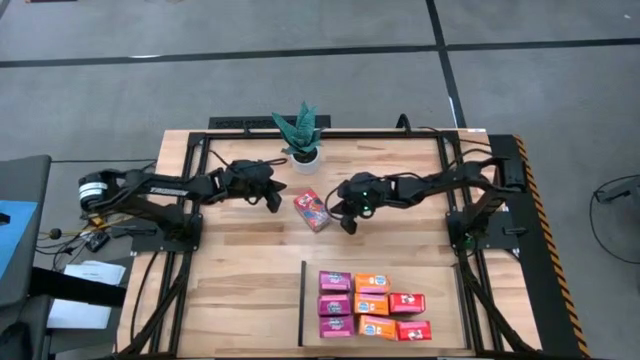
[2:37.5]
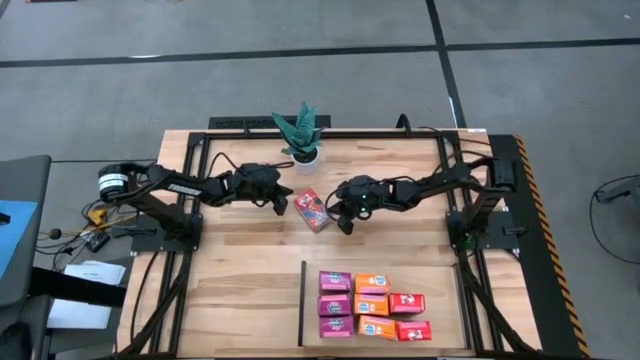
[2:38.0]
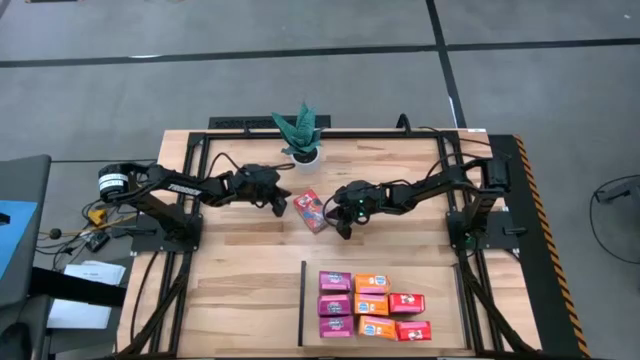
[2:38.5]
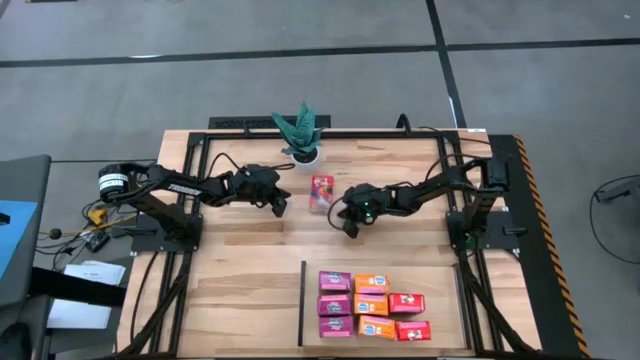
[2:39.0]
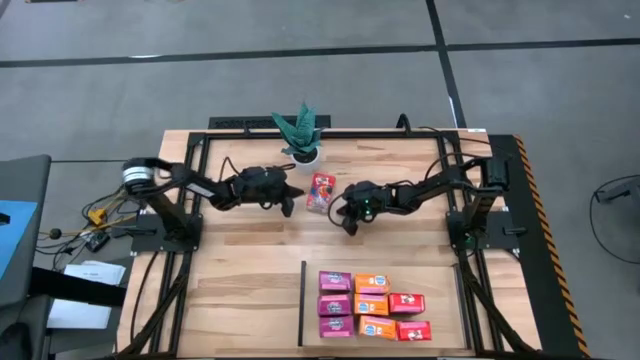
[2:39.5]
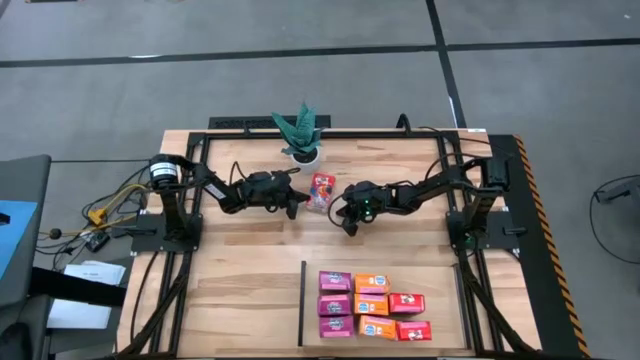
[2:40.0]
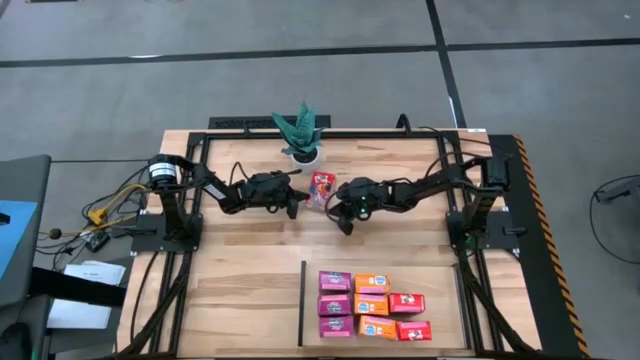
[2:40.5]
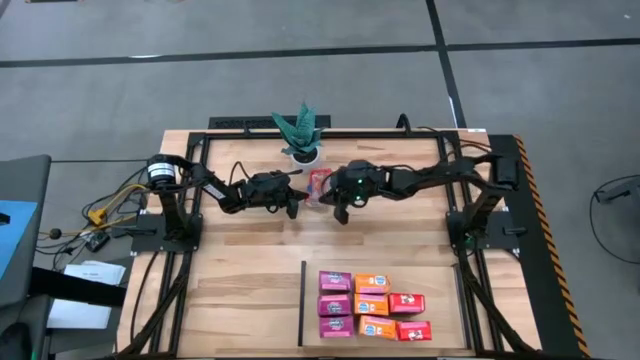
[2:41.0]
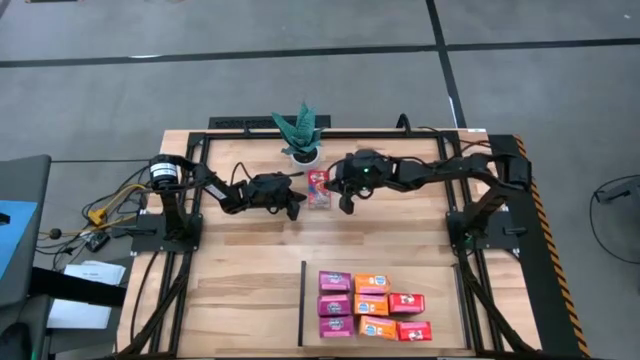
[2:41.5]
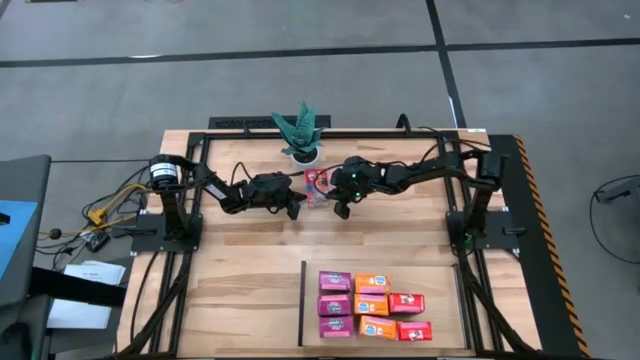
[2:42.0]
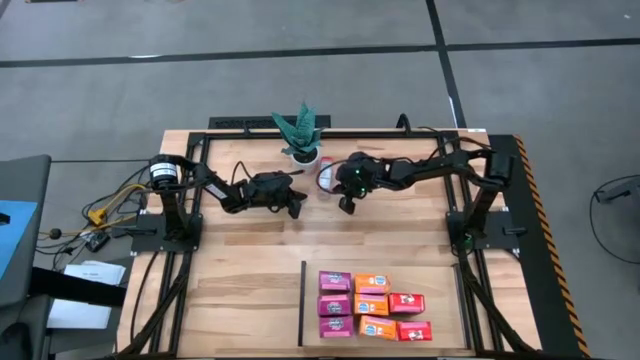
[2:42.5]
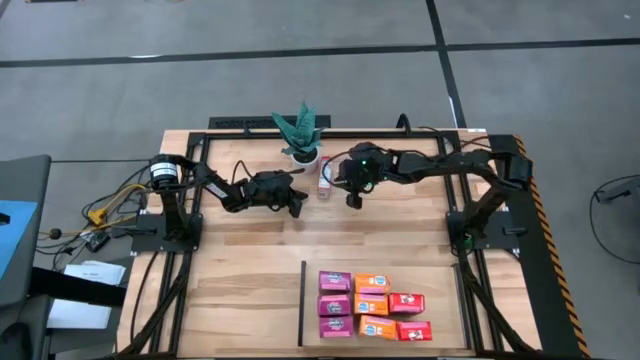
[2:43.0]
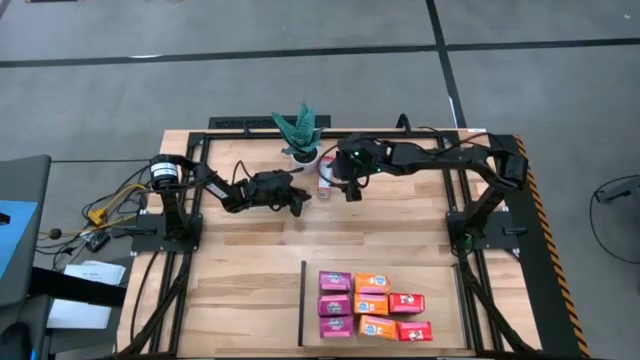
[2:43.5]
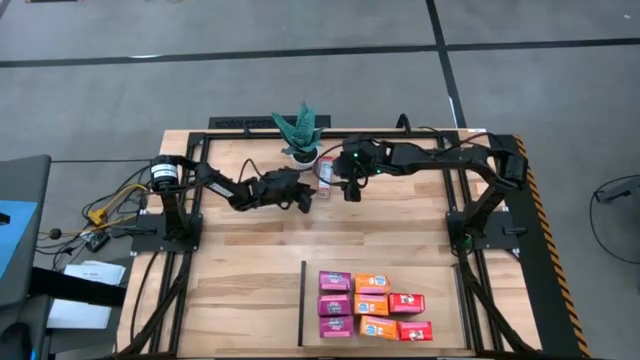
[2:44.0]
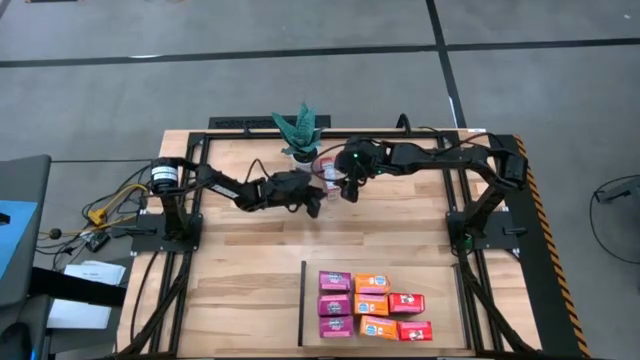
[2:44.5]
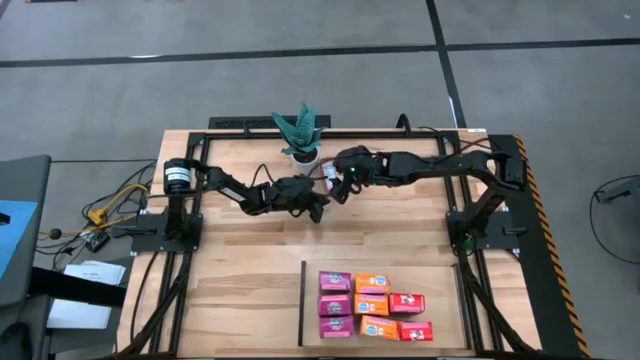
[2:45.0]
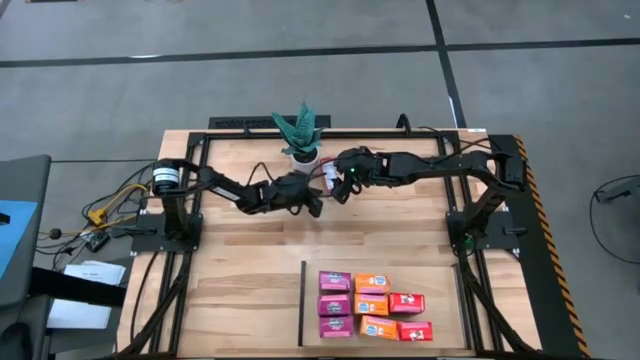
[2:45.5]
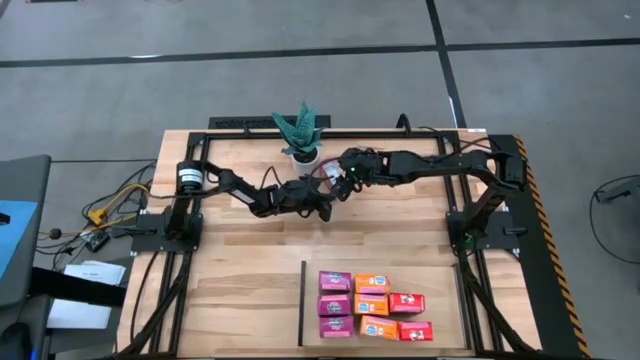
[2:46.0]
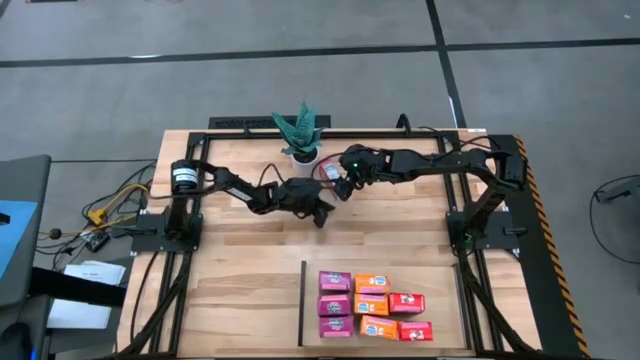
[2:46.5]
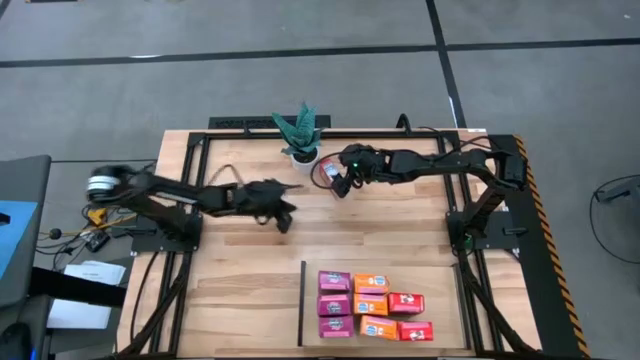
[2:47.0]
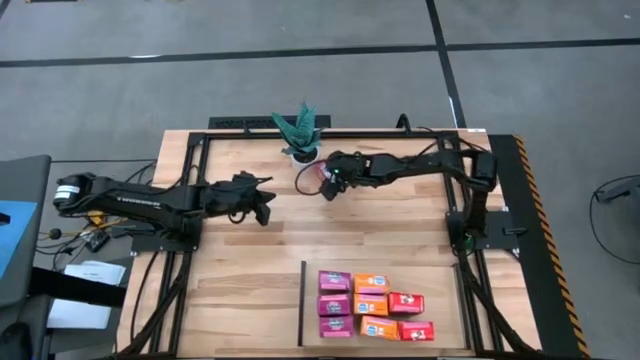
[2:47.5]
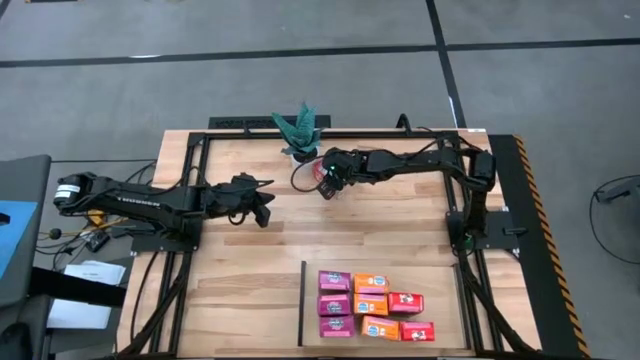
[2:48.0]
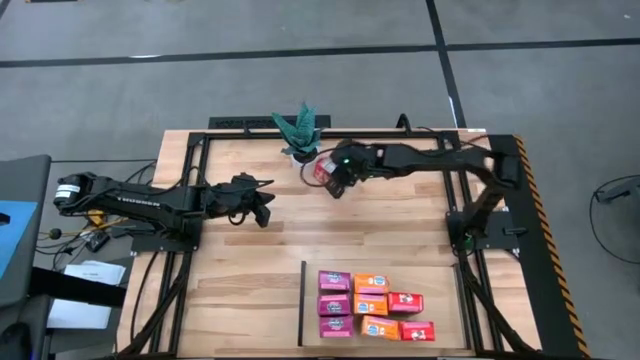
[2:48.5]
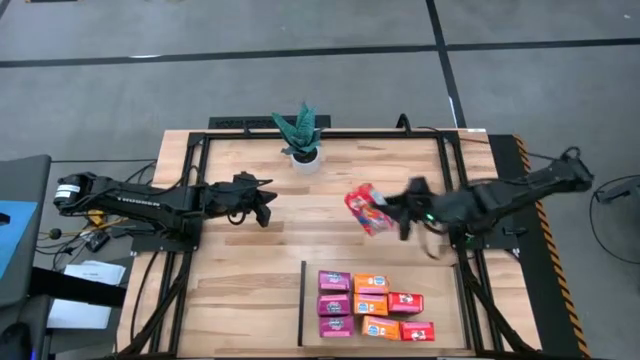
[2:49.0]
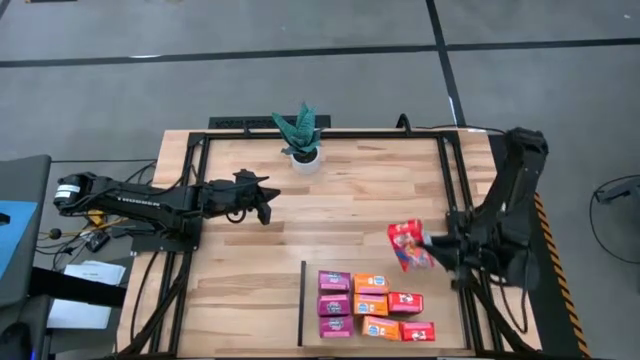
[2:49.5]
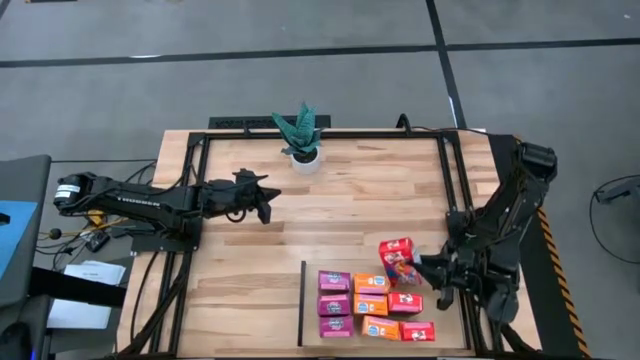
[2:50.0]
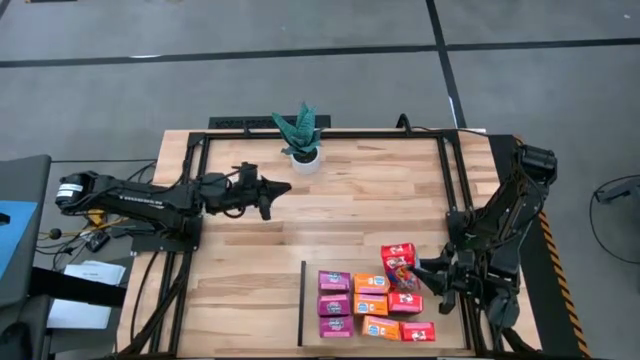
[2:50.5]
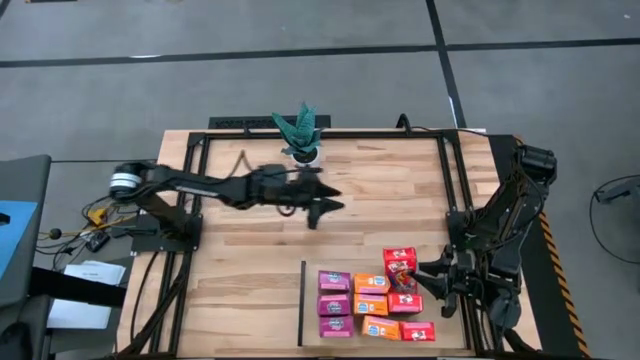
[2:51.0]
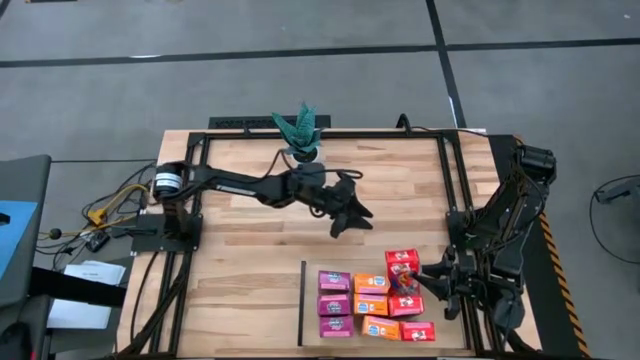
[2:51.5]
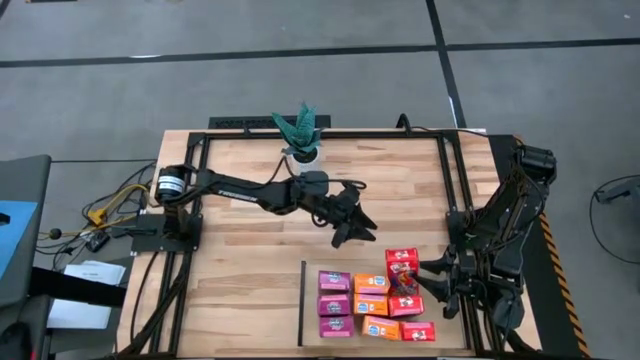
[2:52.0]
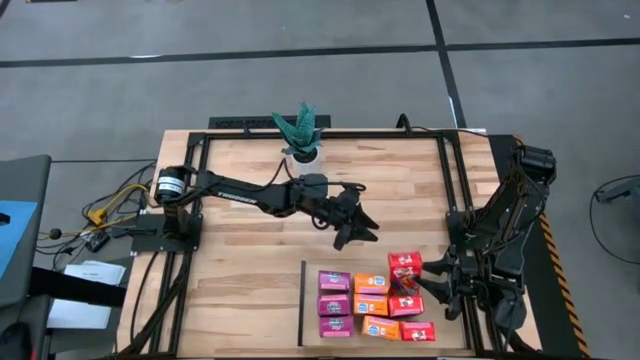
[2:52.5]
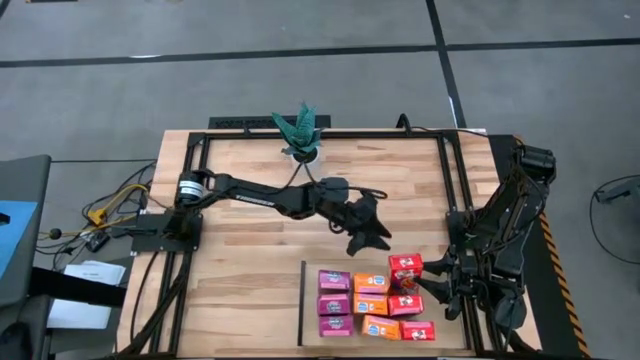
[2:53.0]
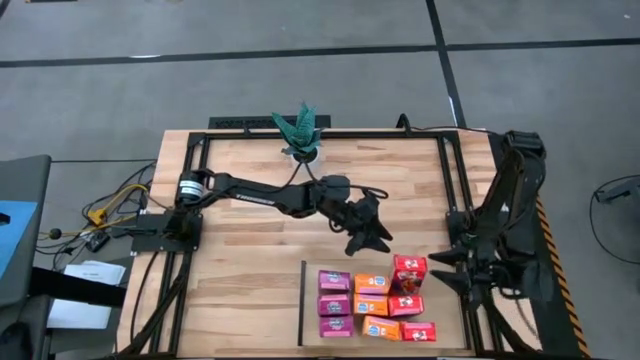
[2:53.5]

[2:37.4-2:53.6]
Task: Stack cereal on shelf
Put the red cereal box on the upper right shelf

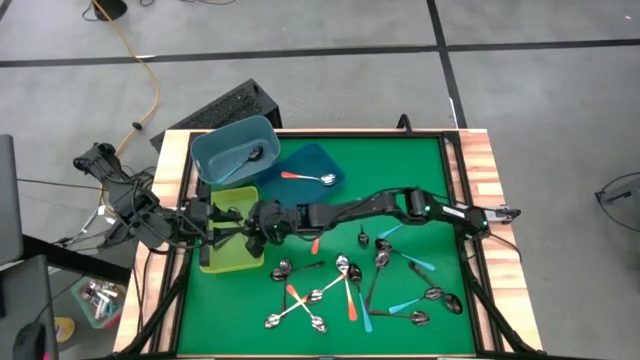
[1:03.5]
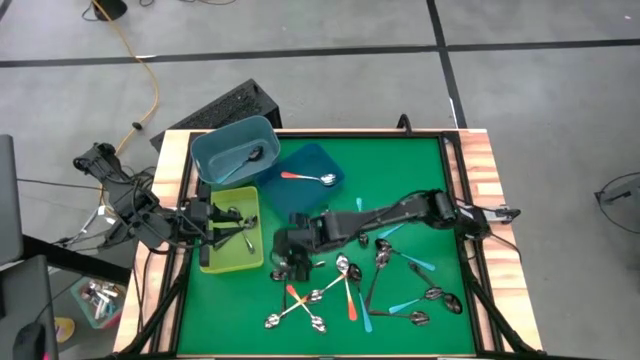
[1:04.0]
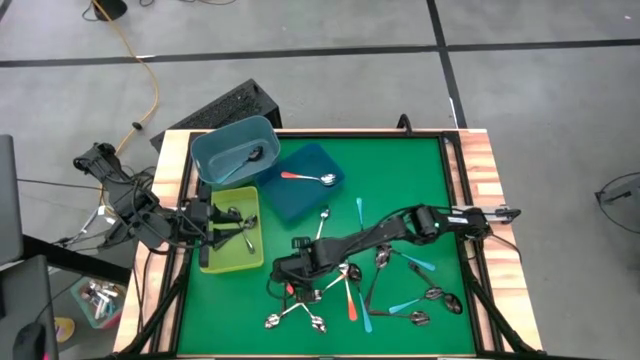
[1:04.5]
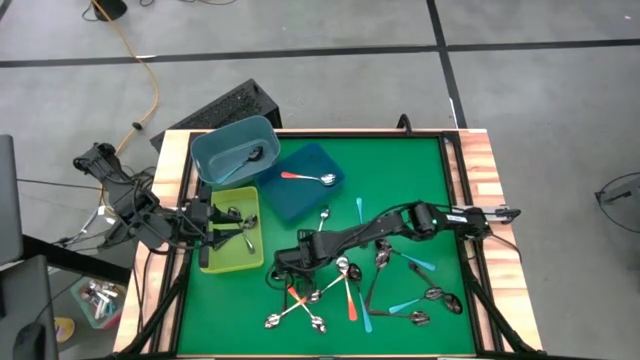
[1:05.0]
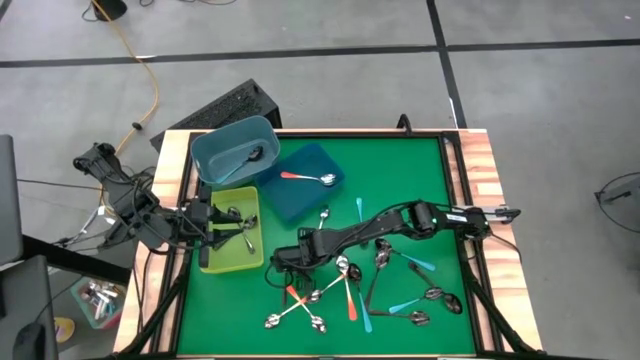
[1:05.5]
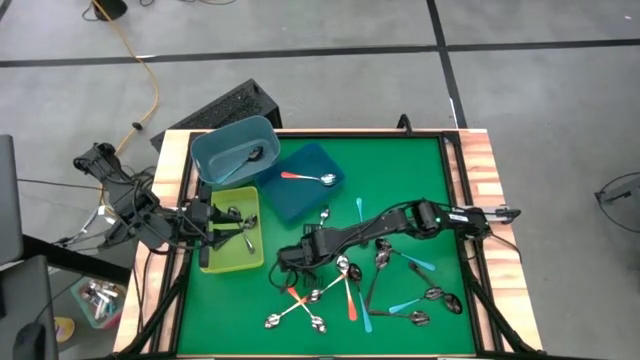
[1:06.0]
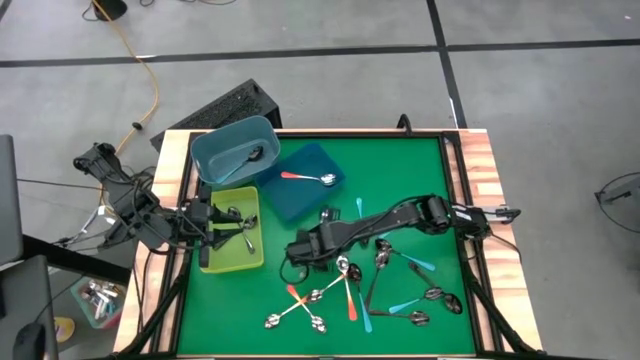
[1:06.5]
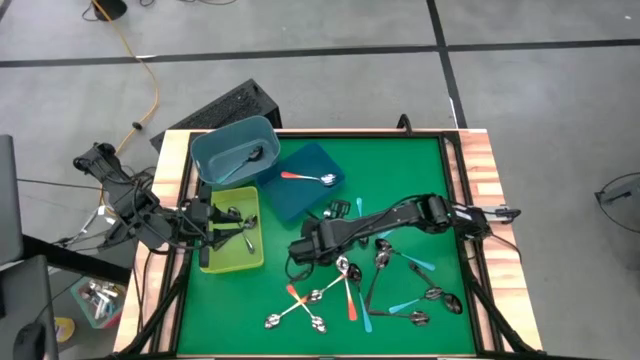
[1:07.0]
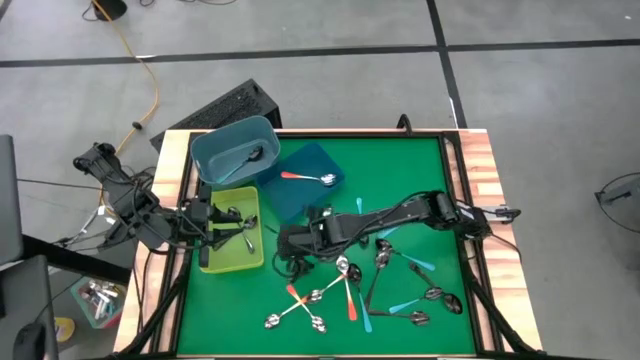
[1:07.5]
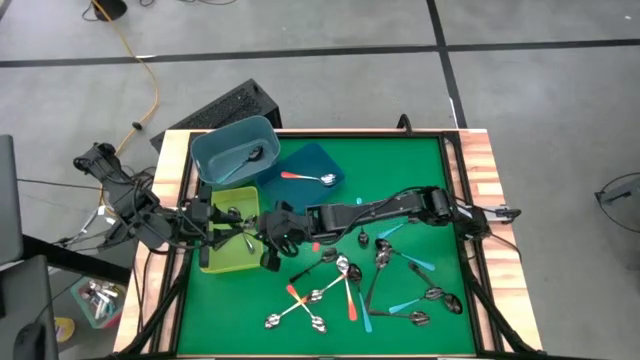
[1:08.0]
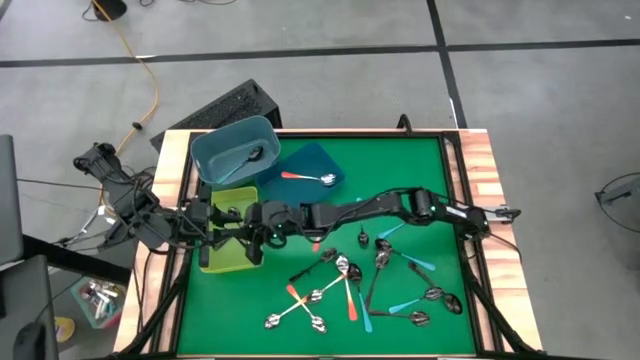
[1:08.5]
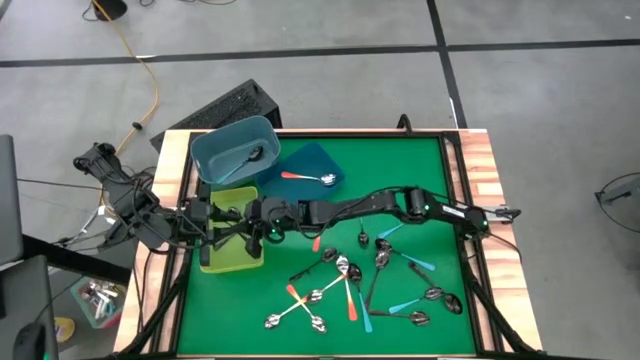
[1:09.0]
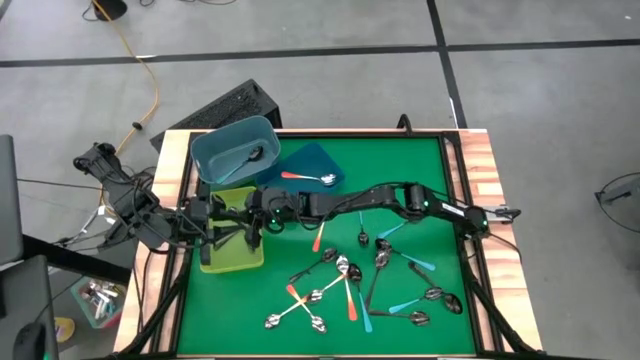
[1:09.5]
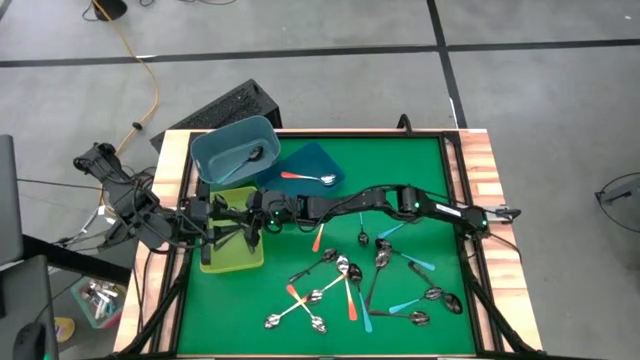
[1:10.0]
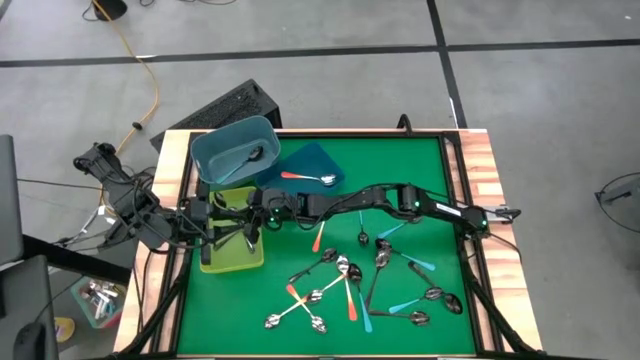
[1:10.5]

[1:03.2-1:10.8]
Task: Sort silverware by color (type)
Put the black spoon into the green bin
